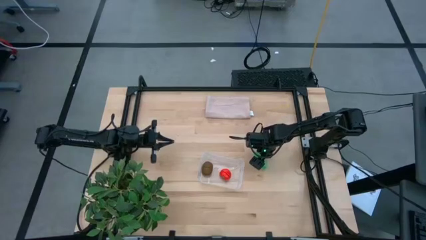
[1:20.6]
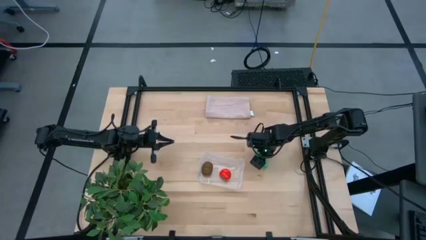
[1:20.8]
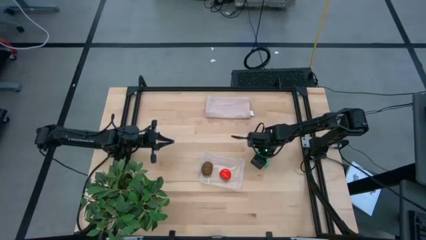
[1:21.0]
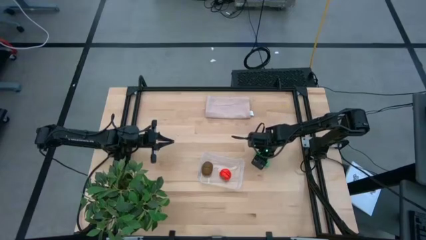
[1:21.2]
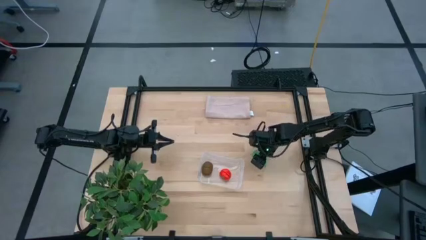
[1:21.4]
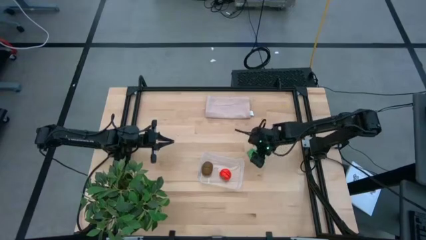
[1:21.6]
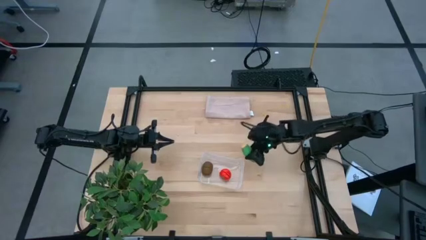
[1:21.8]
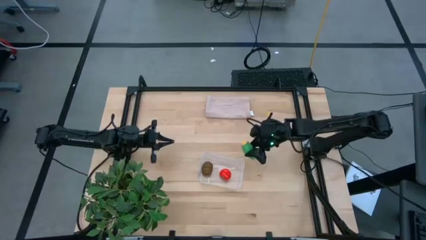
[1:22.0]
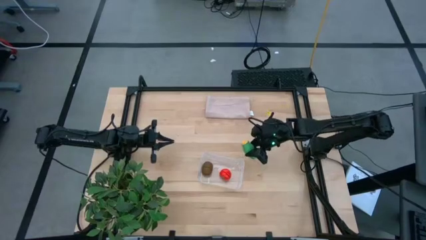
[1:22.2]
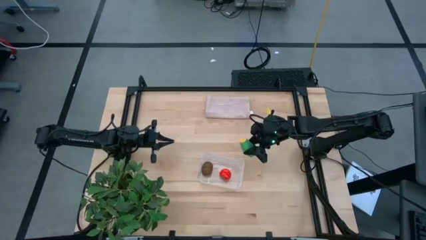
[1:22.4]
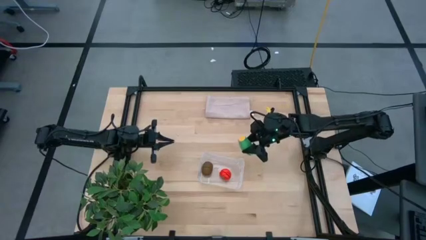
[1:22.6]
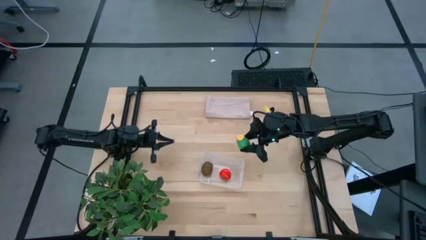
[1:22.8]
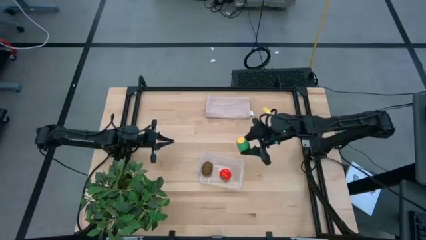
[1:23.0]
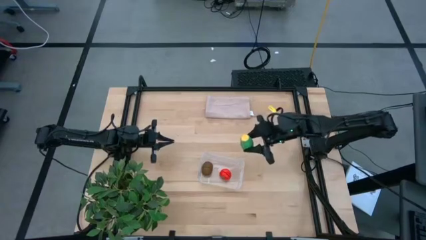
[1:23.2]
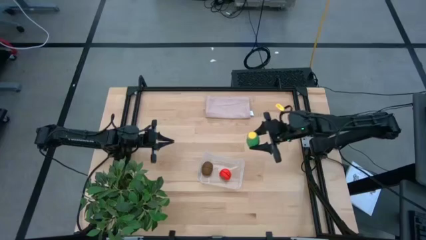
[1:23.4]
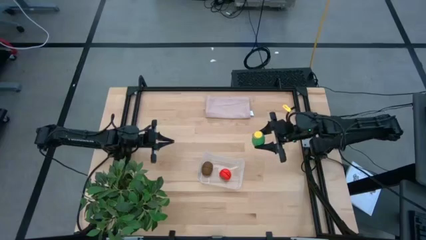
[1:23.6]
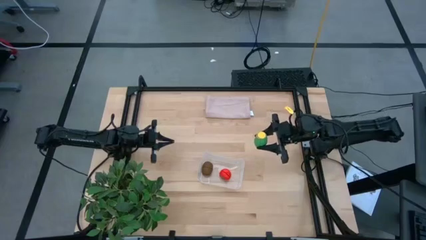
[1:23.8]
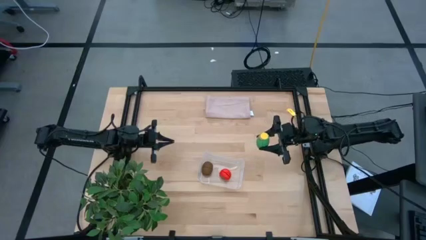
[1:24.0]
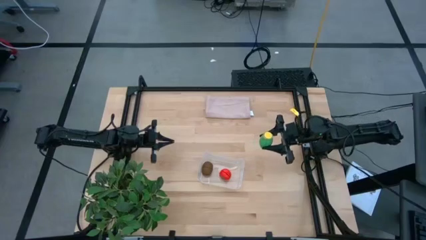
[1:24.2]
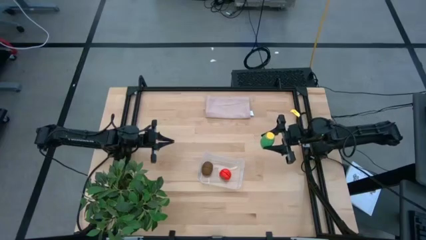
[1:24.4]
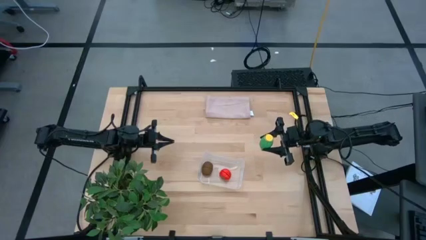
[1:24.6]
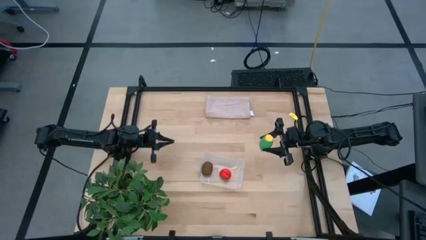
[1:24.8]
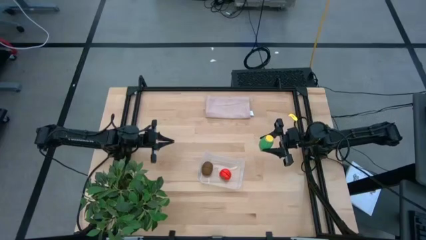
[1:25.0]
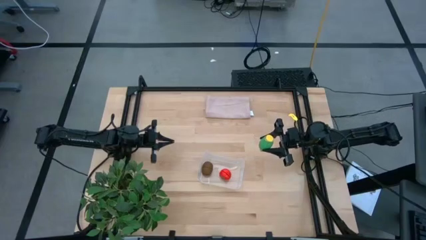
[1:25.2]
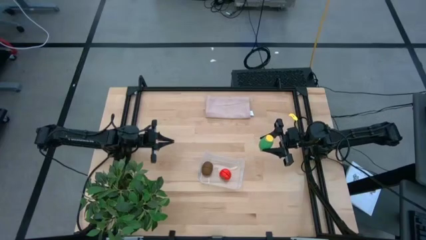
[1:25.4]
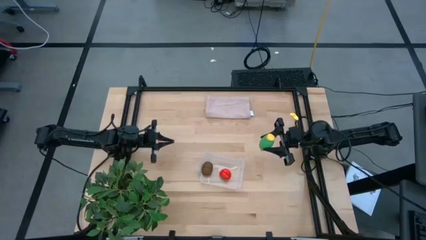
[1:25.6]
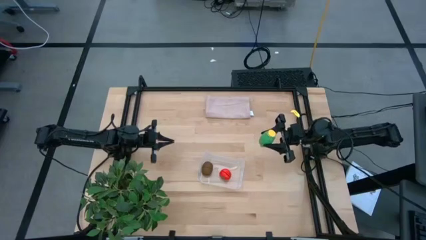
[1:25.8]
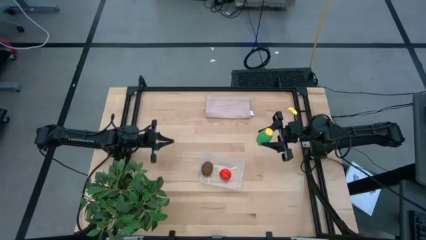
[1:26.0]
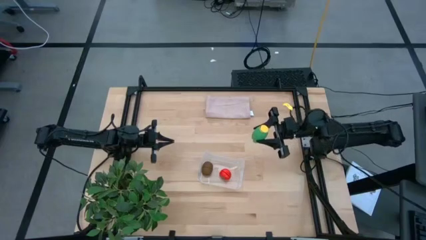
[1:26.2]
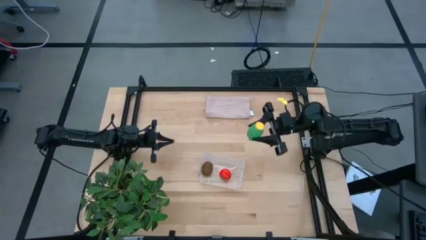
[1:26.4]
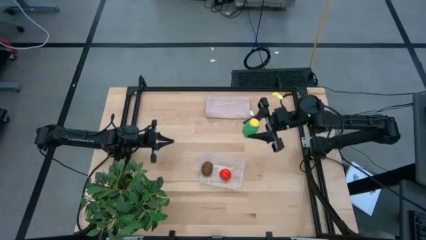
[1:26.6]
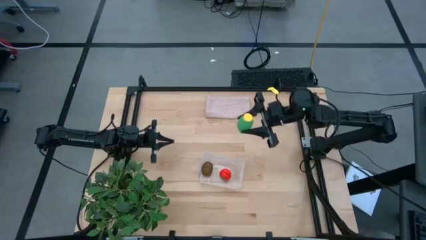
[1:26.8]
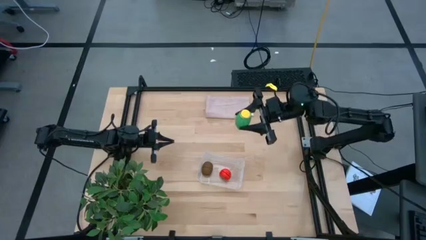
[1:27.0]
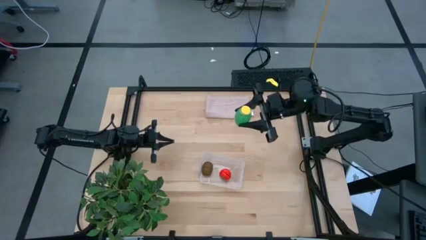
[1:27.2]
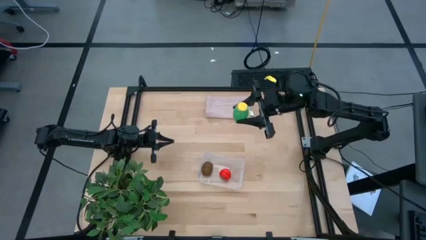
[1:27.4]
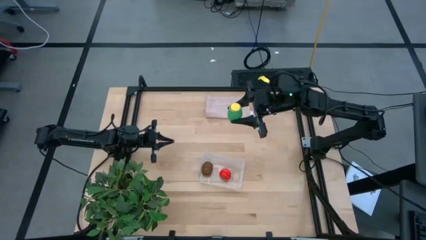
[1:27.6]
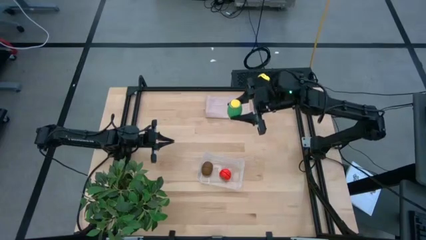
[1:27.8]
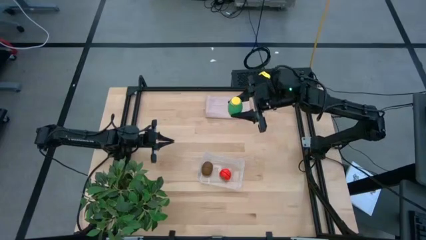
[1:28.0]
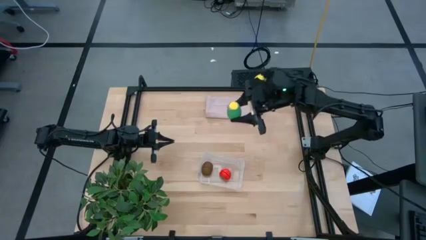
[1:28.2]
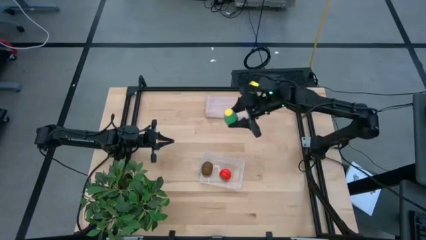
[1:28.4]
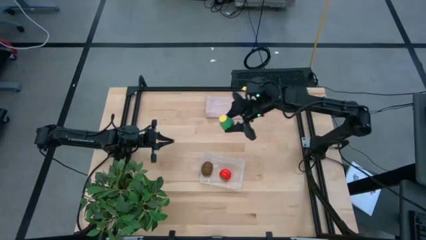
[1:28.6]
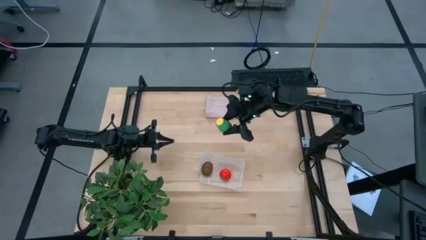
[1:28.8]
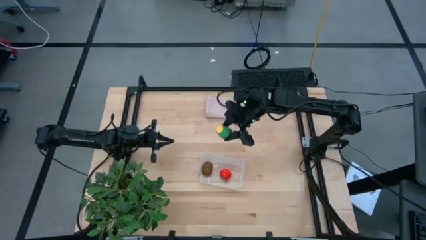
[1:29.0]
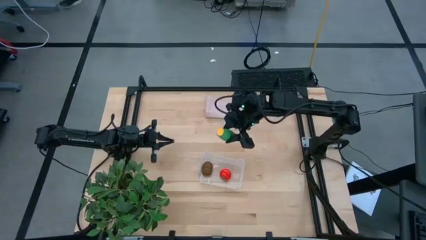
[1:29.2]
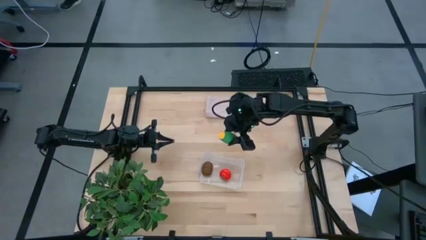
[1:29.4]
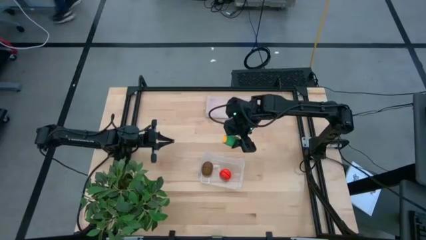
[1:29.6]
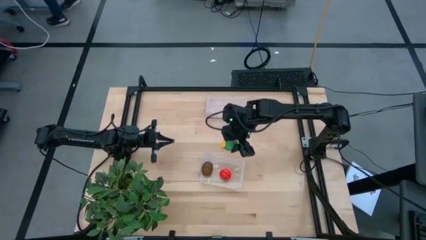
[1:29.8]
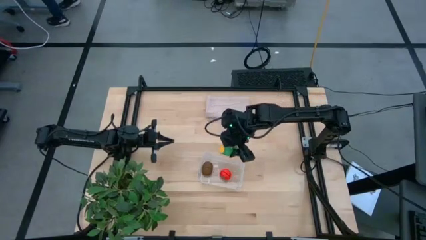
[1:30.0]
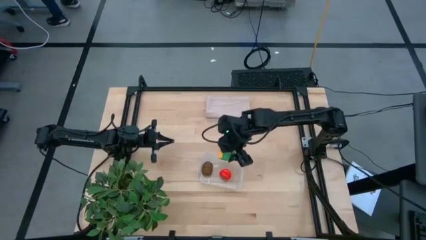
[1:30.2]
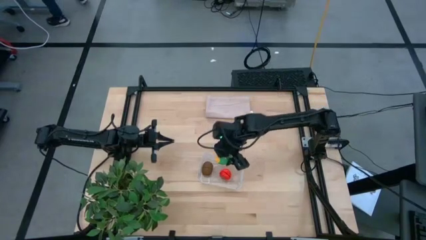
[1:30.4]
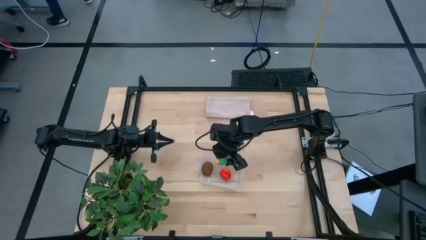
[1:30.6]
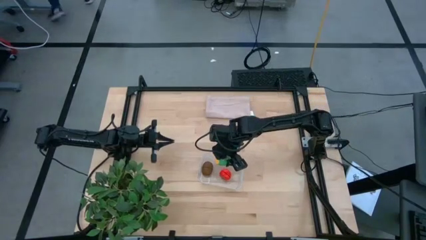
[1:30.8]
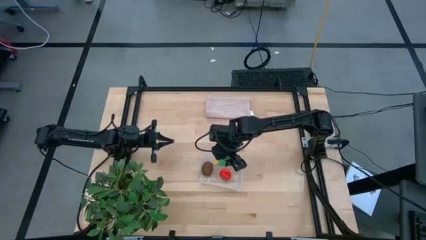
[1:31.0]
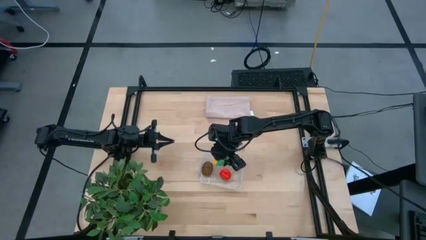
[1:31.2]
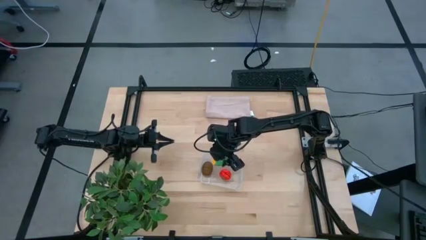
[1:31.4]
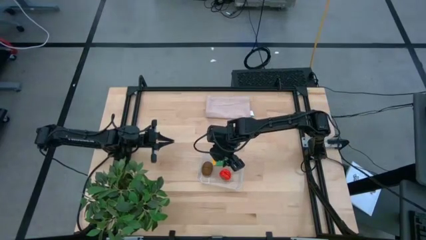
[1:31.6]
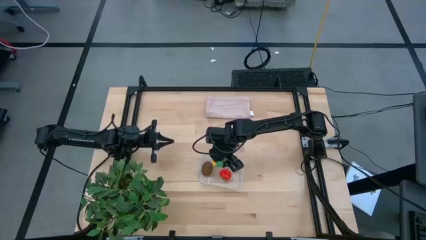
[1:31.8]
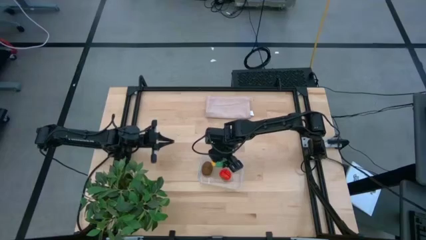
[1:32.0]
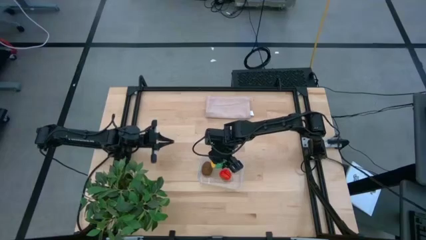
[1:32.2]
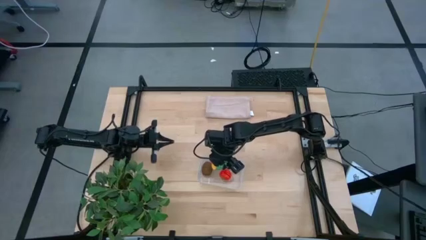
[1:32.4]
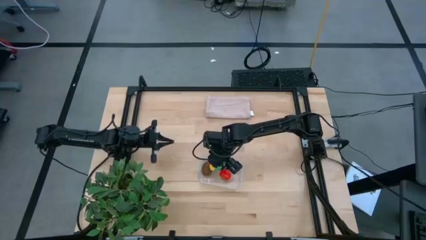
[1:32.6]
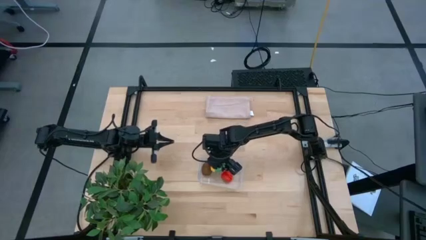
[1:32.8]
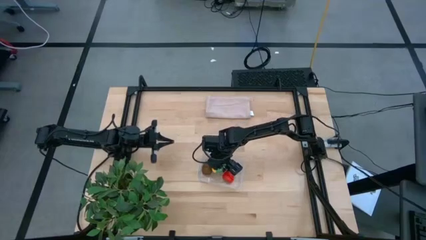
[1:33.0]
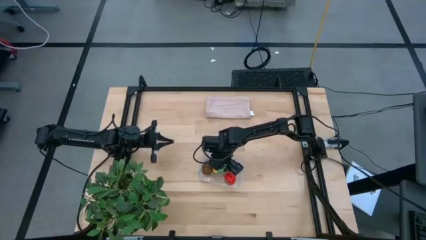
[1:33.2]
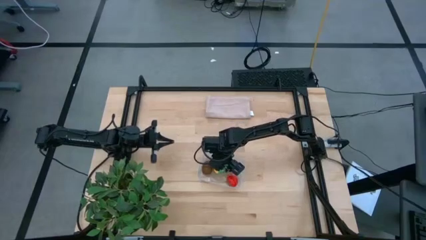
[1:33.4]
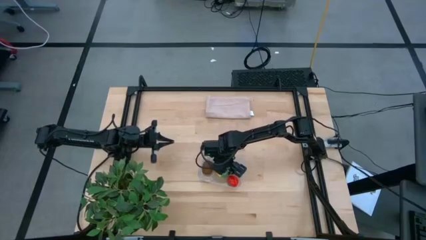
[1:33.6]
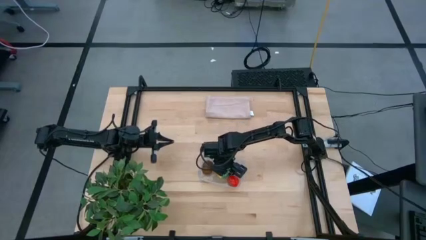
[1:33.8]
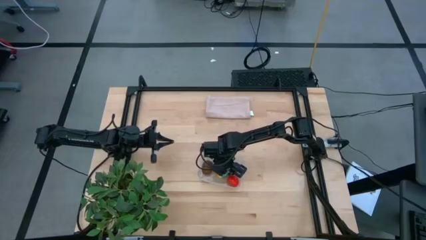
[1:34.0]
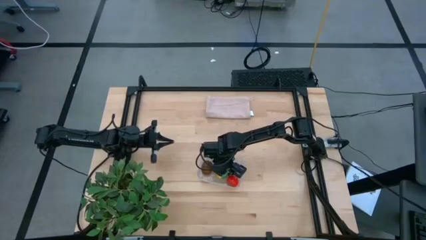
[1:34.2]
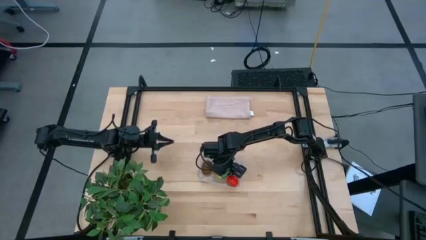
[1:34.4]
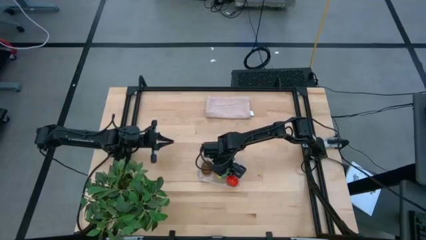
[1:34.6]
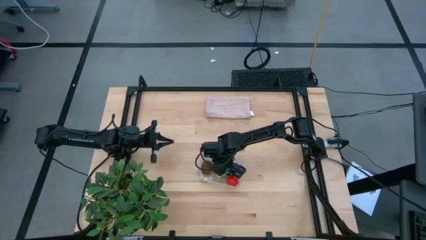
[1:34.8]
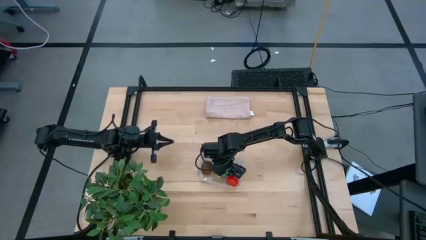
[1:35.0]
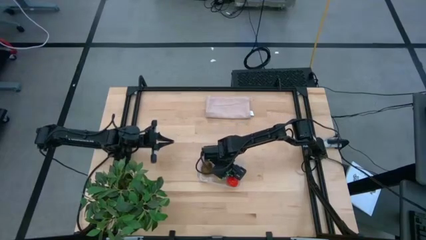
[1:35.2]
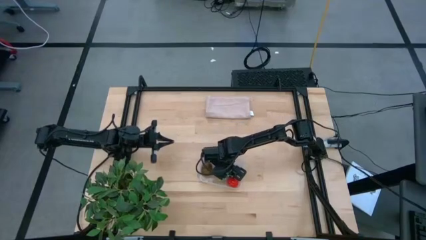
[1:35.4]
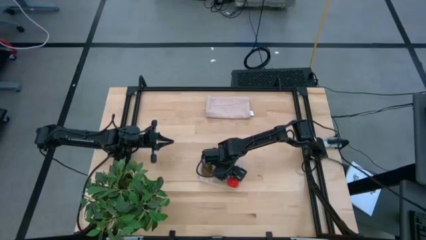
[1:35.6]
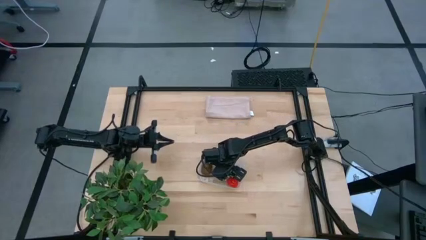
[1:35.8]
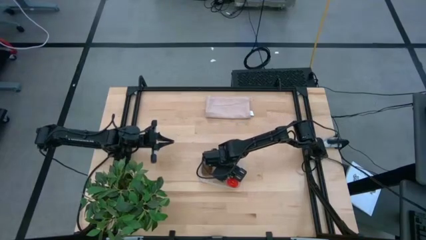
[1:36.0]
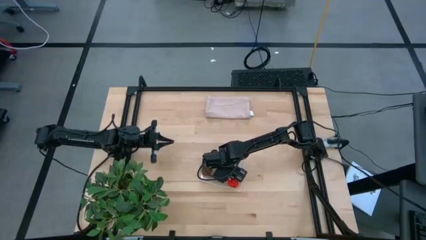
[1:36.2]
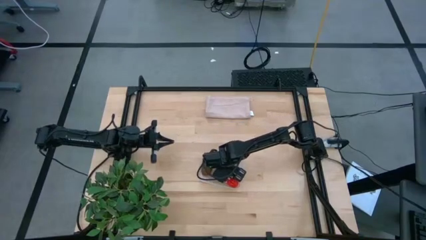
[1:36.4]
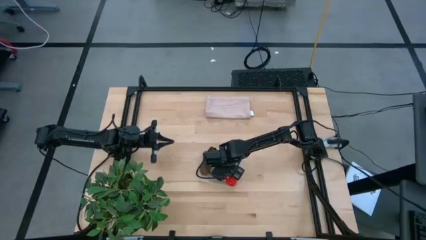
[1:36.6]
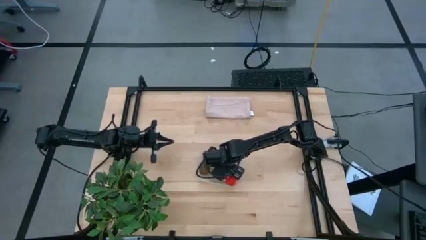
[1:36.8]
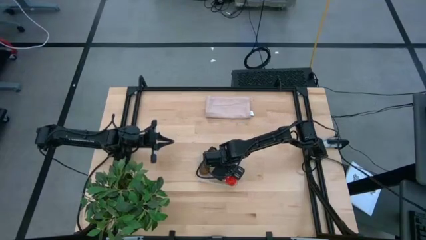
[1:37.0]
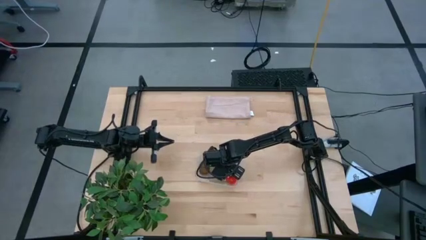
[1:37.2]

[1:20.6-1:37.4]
Task: Pick and placing Produce into tupperware
Put the green corn into the transparent bin

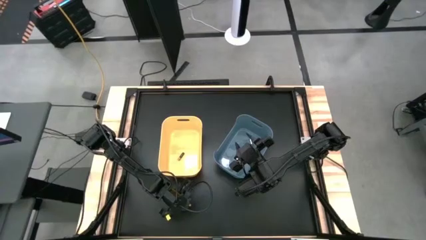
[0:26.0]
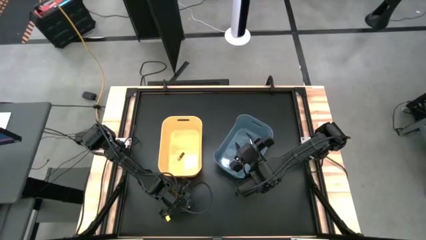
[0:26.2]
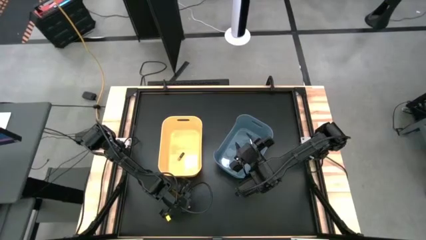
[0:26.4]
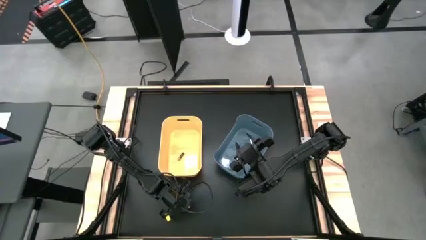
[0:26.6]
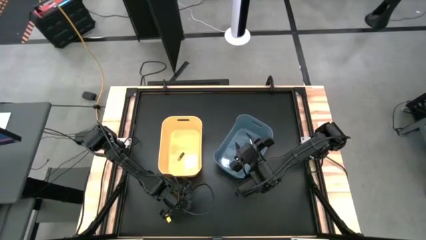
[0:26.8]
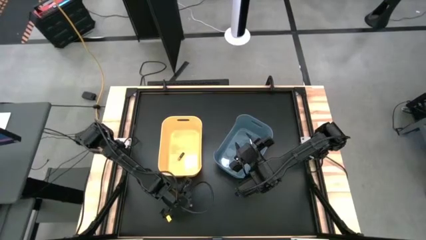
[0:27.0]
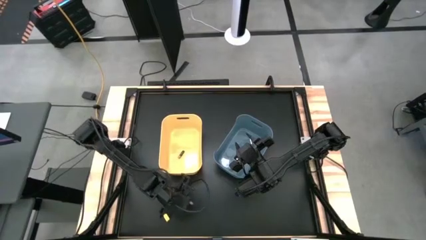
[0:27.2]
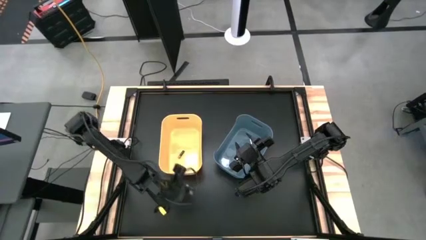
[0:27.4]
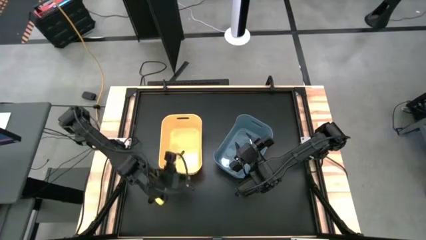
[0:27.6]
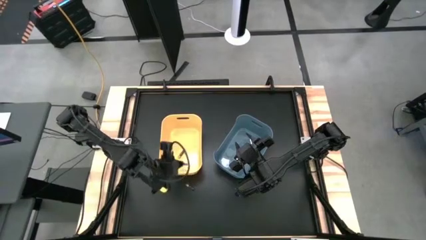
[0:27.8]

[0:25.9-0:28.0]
Task: Sort batteries
Put the bottom black battery into the yellow bin
